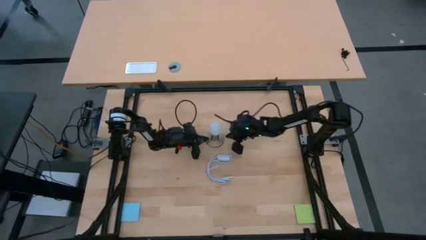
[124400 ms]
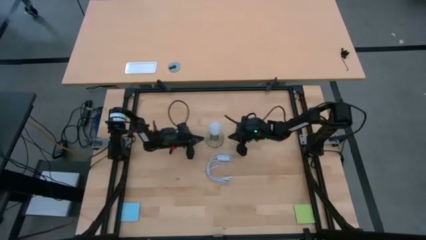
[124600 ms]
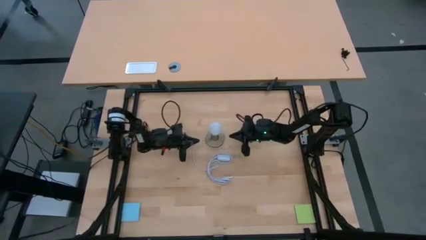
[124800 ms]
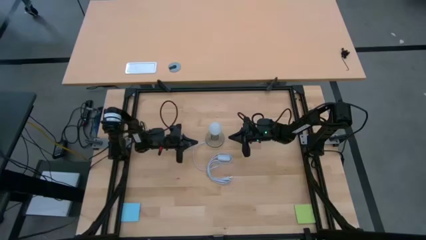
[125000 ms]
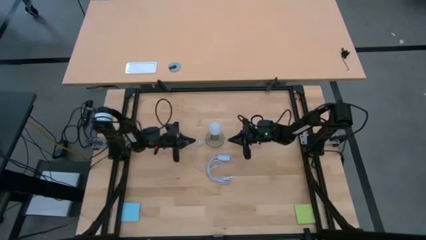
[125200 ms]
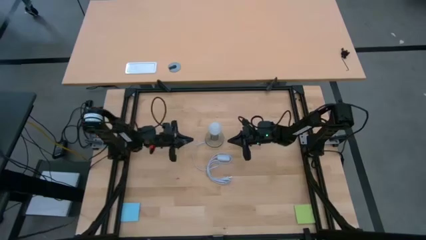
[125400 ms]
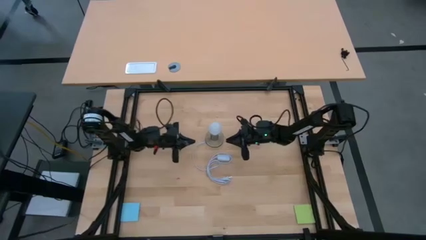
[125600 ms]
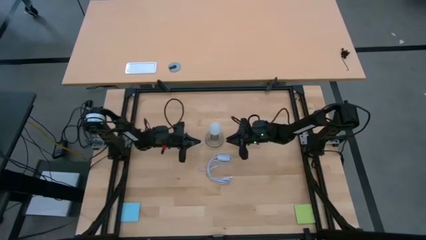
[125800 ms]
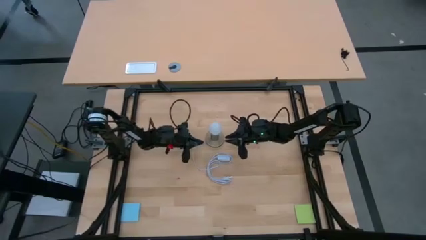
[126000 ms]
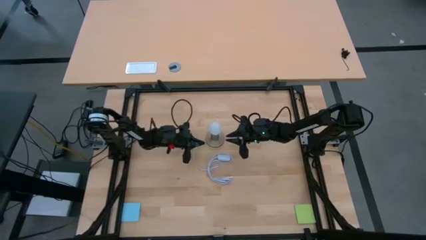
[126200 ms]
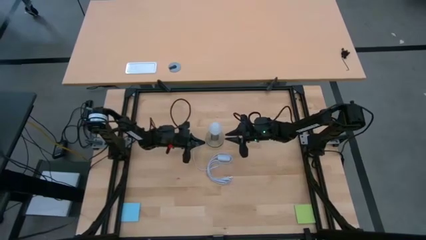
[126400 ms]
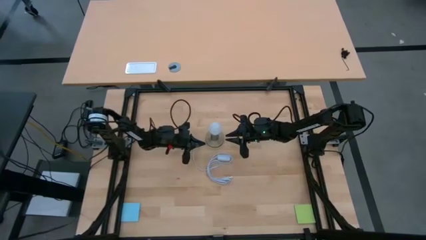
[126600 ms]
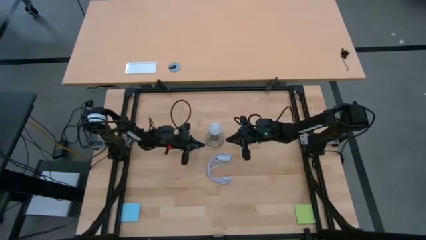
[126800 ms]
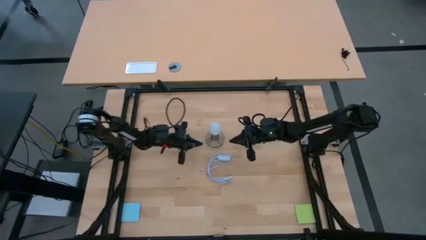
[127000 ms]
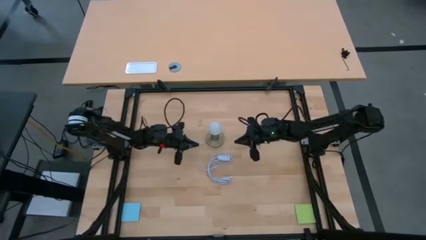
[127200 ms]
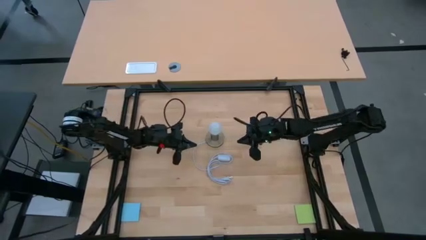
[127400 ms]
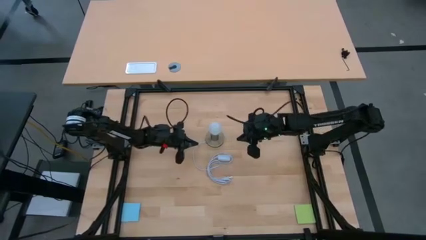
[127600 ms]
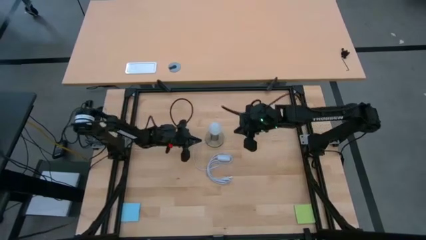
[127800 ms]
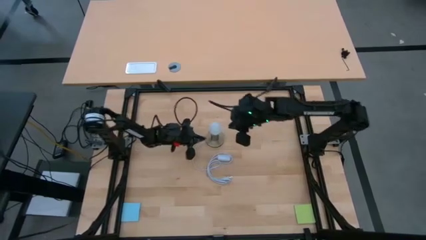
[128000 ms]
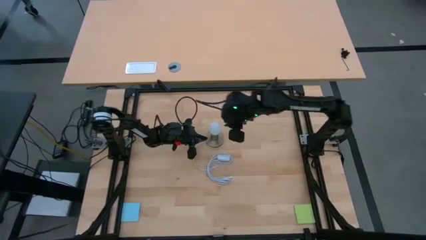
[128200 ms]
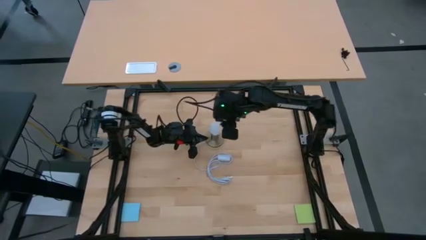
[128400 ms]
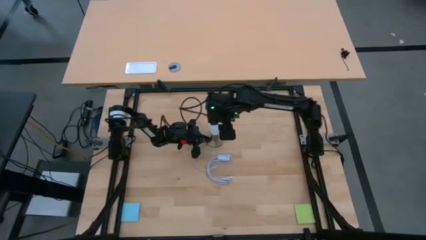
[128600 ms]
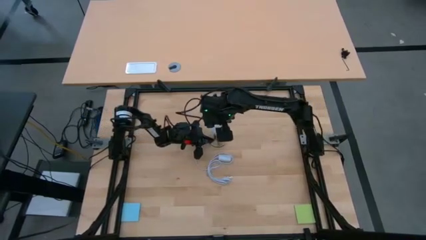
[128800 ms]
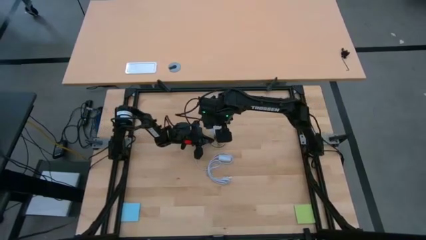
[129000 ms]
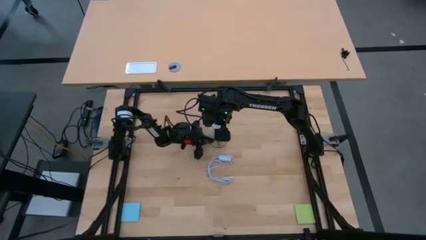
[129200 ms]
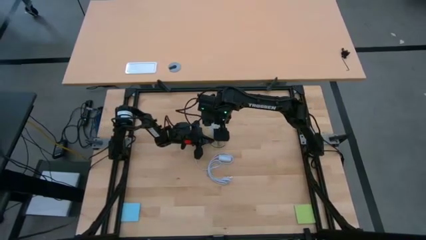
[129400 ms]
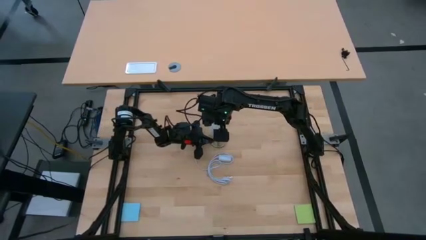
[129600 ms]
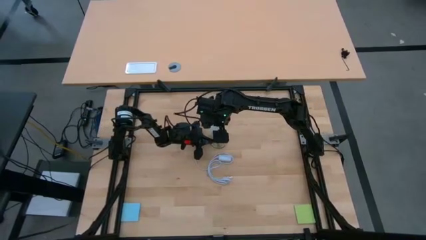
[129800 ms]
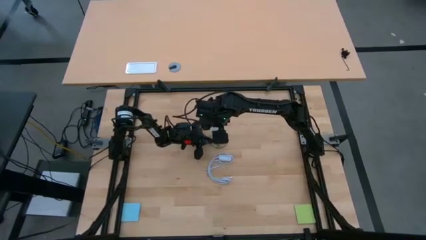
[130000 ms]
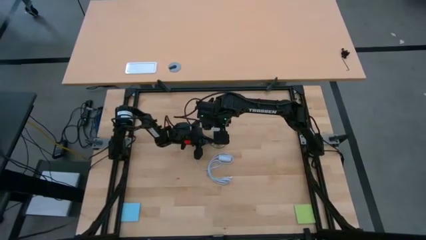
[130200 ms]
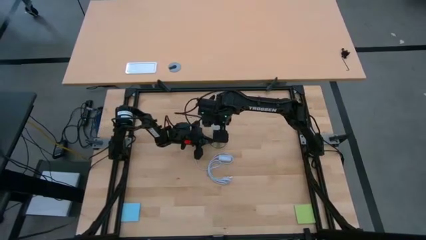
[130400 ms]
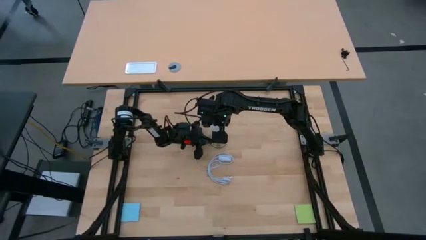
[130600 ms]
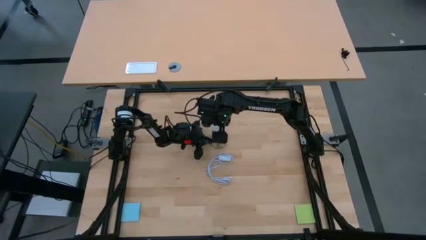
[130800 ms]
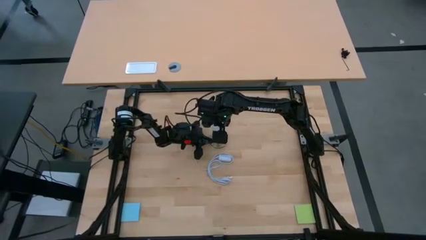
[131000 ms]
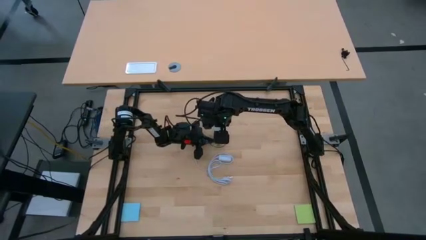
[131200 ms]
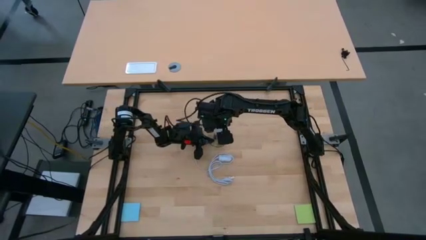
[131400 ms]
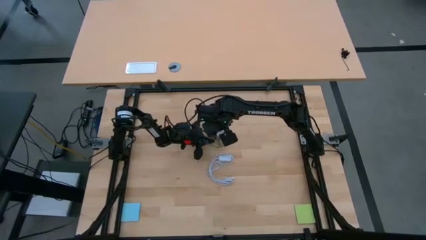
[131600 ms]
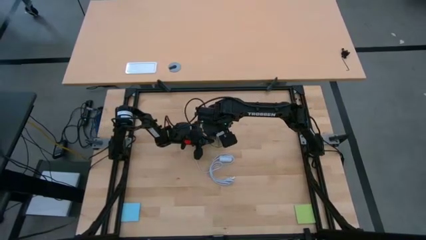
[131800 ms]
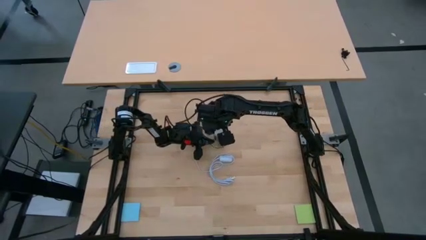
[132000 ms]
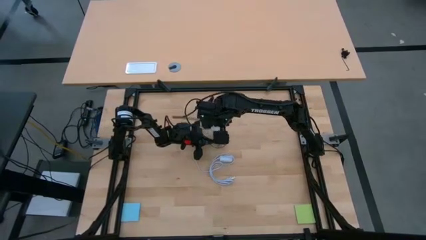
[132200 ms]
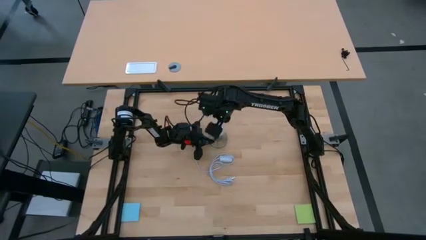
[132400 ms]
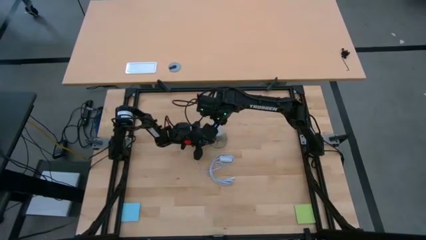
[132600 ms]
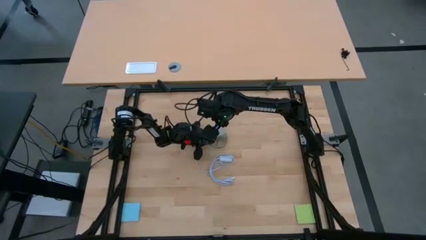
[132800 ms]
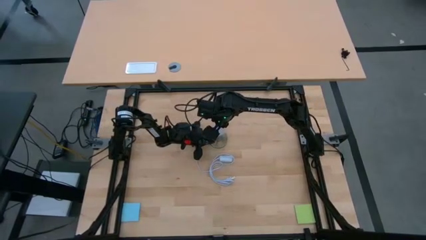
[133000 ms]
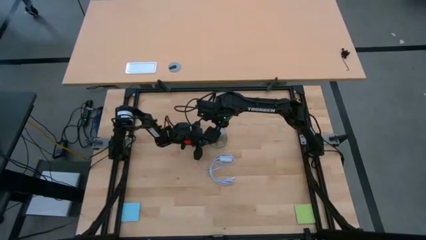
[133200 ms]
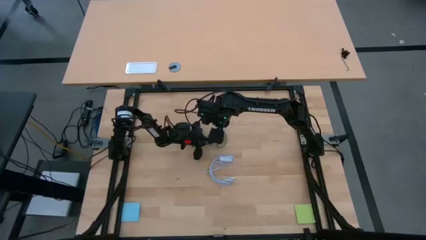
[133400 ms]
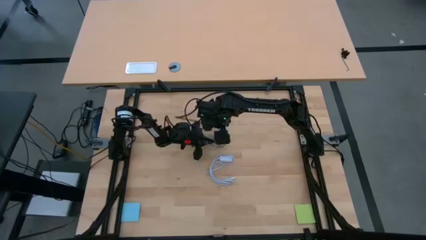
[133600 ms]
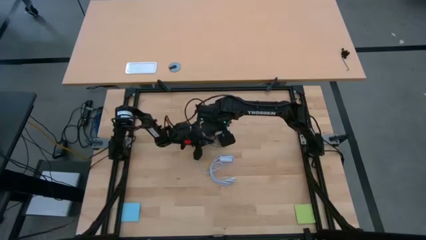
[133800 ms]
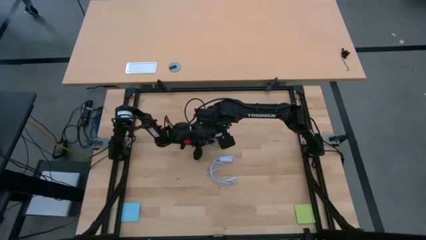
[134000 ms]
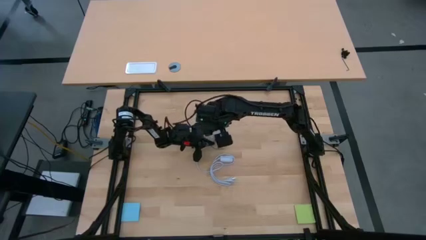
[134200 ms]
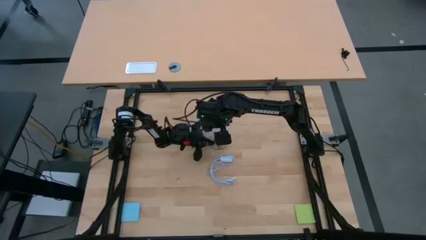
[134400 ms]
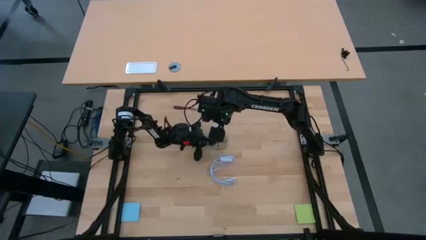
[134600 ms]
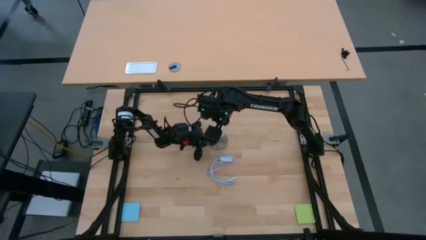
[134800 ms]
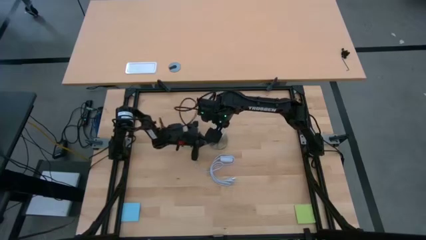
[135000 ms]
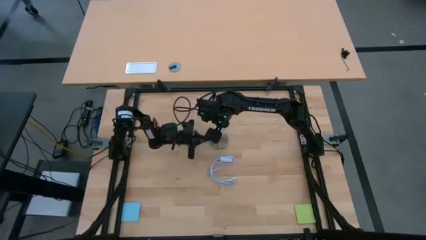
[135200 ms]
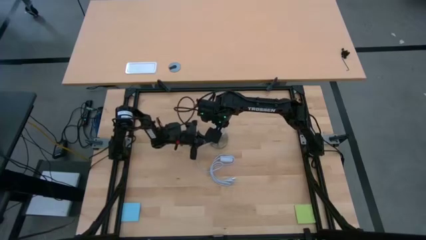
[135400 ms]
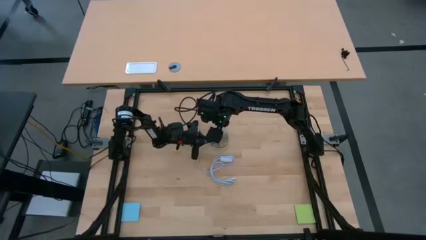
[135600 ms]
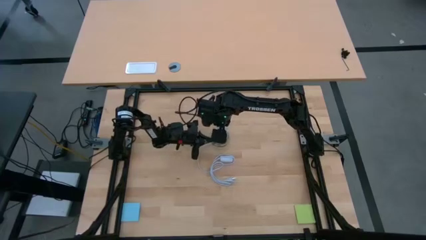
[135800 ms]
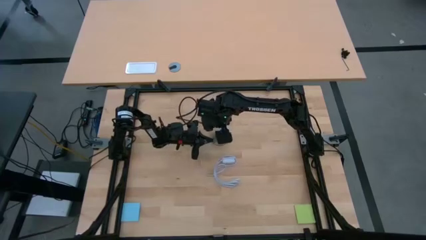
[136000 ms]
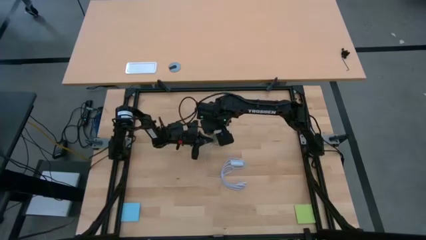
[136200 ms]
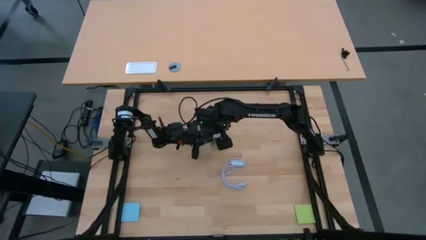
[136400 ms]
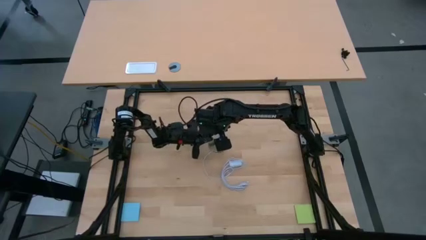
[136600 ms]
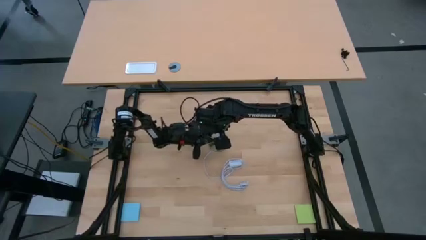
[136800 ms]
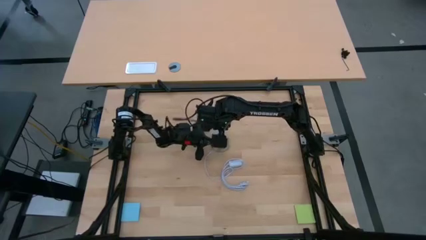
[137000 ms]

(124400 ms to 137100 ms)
Task: Screw lightbulb
Remove the white lightbulb from the golden lamp

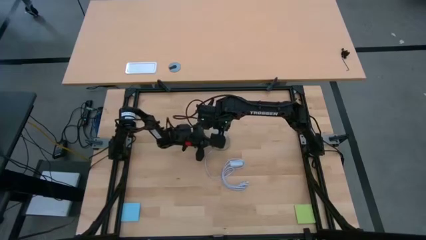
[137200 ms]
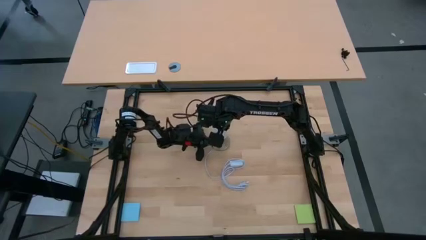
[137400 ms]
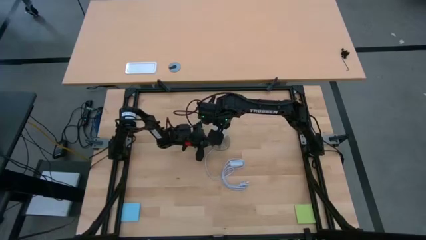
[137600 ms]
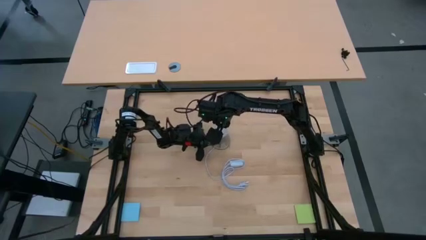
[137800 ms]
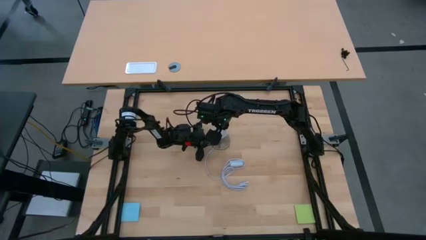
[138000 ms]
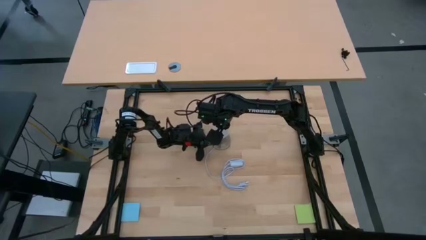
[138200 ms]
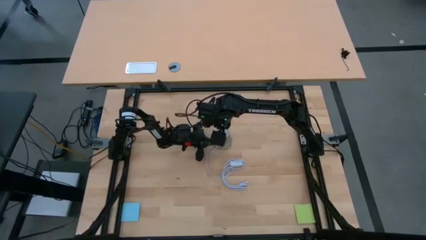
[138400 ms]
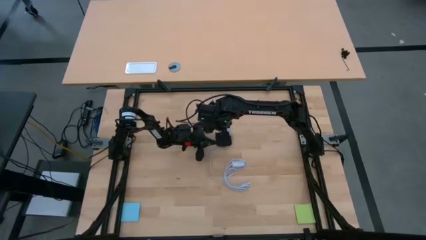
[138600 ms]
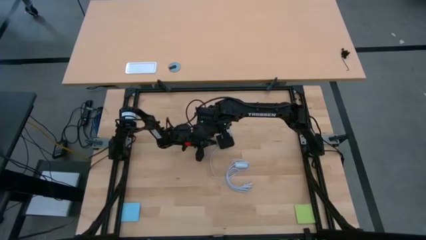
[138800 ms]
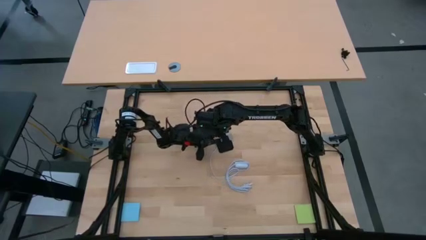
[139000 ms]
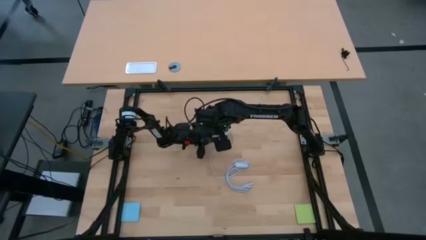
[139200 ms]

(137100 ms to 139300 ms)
Remove the white lightbulb from the golden lamp
